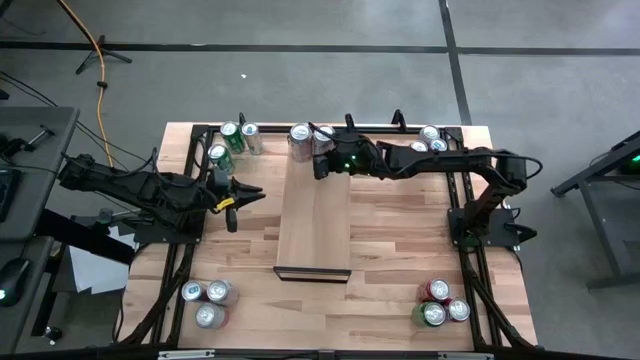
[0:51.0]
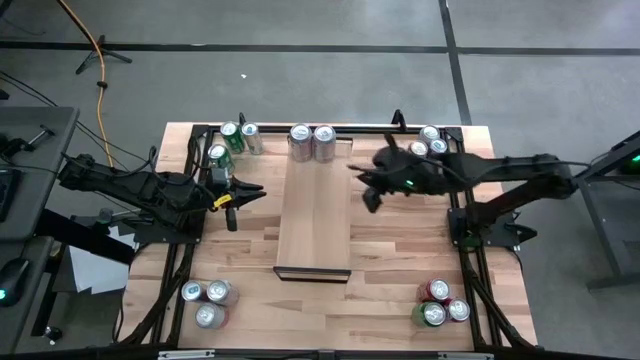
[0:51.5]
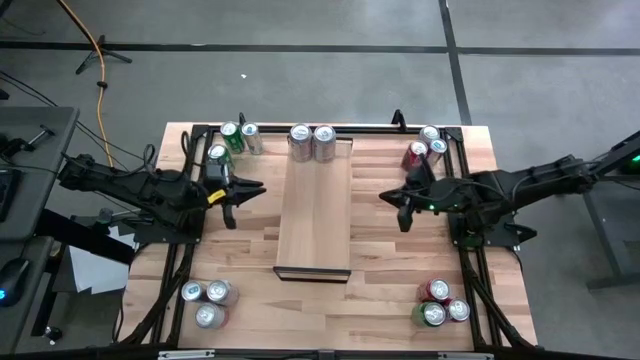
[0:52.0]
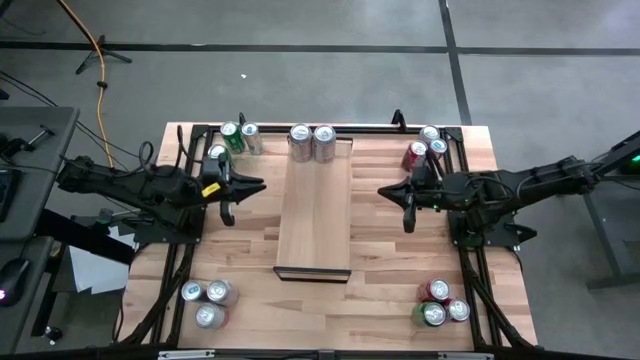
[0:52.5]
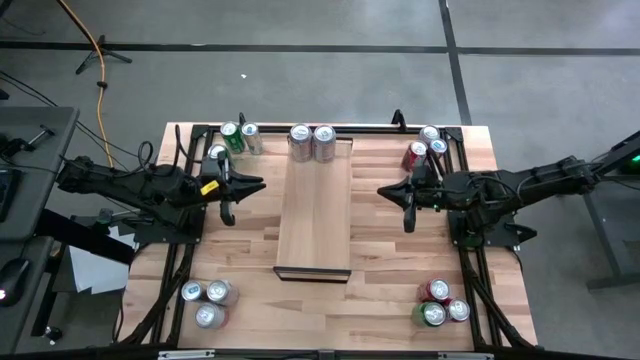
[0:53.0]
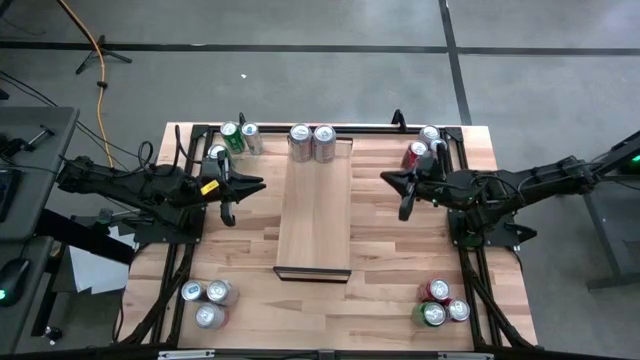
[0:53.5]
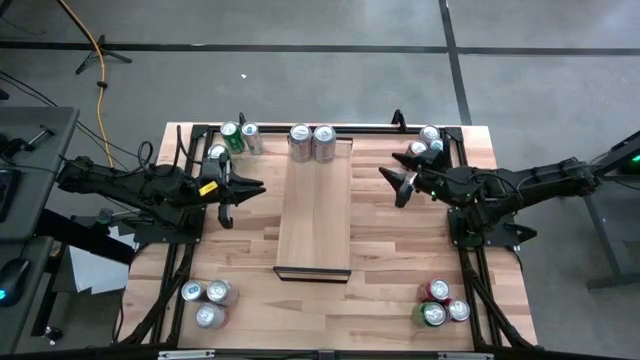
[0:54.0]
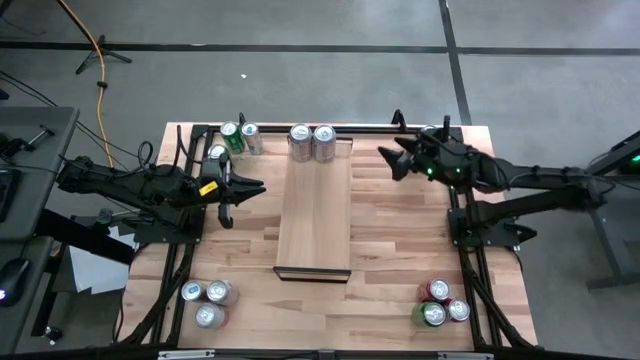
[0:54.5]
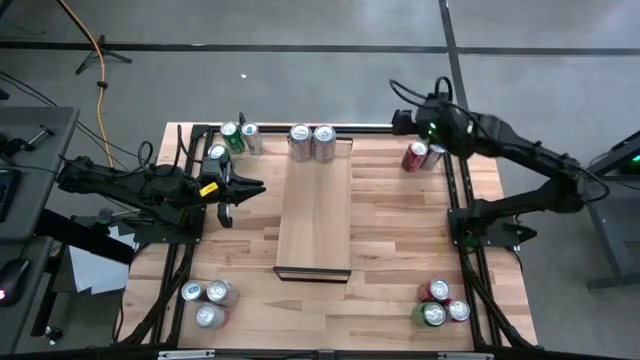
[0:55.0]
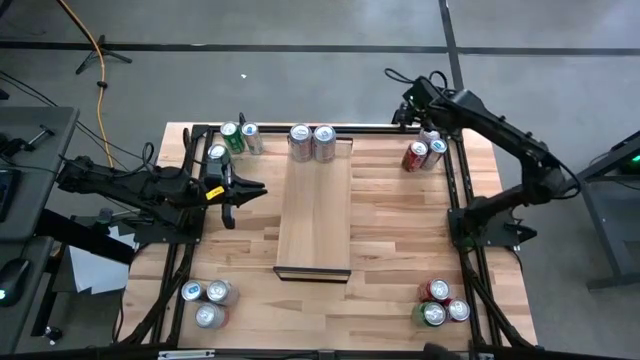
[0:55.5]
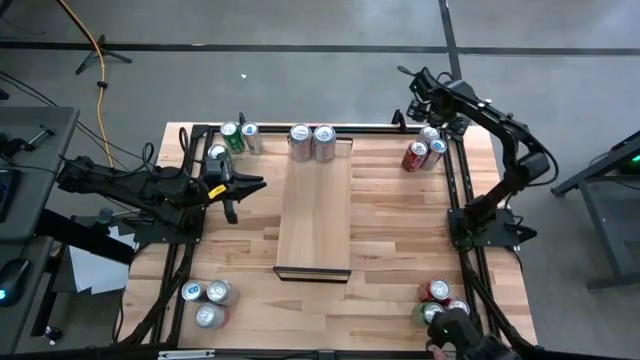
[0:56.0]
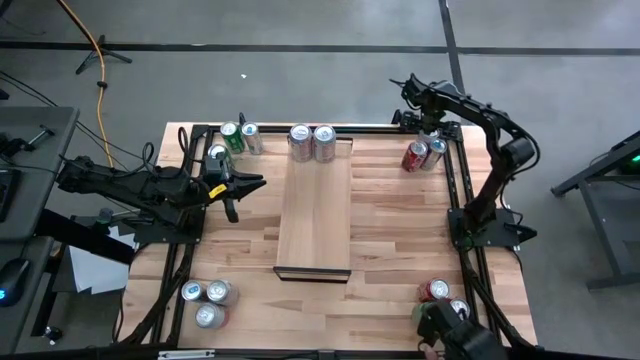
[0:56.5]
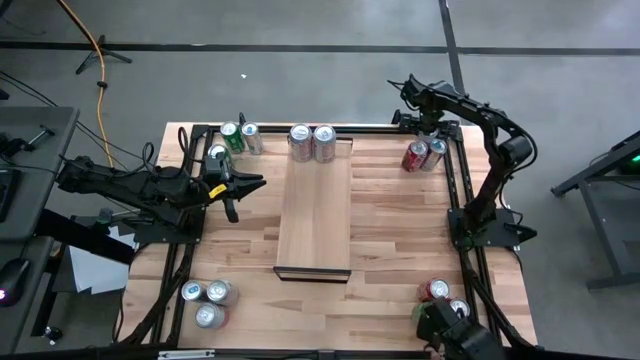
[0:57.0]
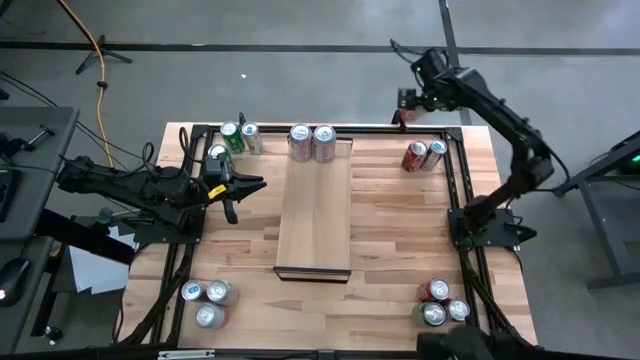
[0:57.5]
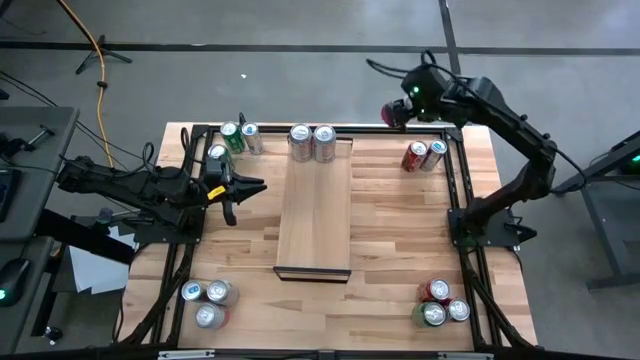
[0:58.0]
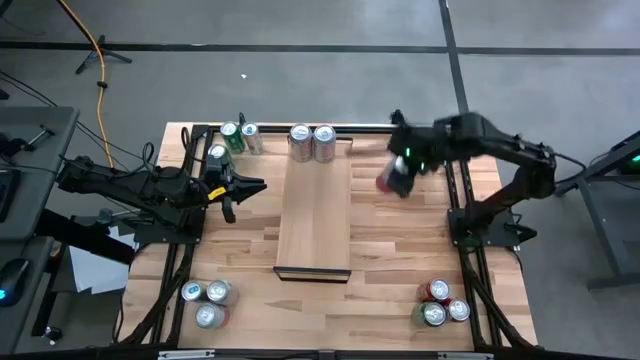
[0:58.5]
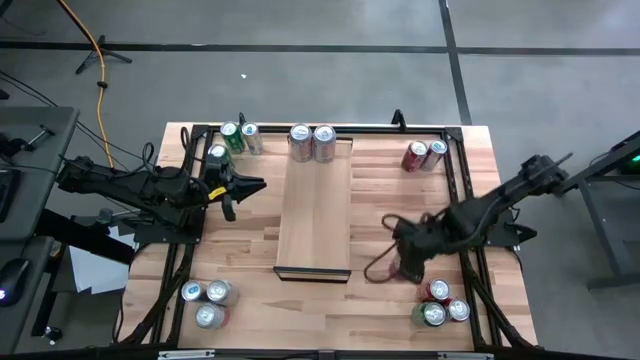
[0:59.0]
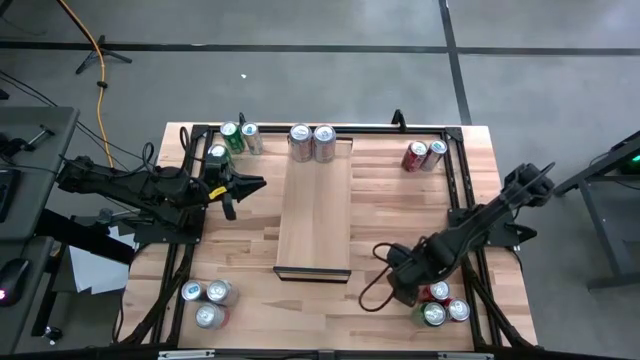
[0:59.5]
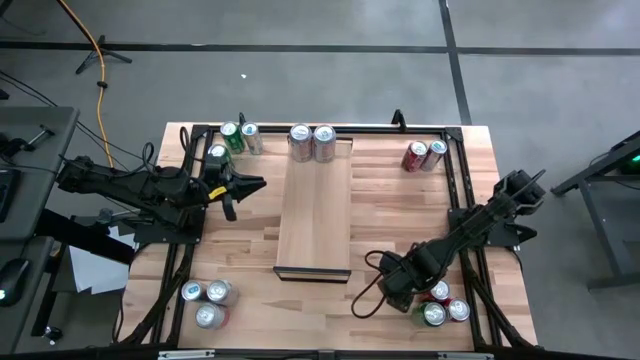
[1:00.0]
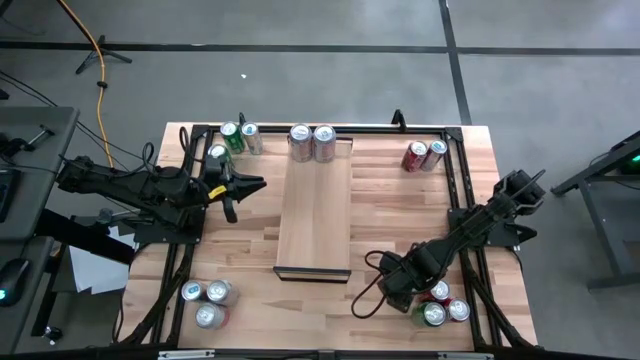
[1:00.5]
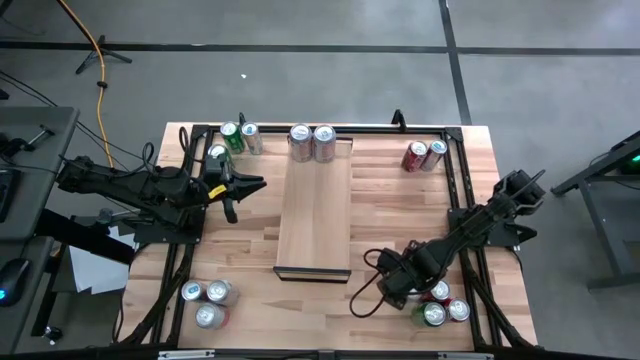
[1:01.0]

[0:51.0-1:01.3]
Task: Place canned beverage on shelf
Move the pink white soda can to the bottom right

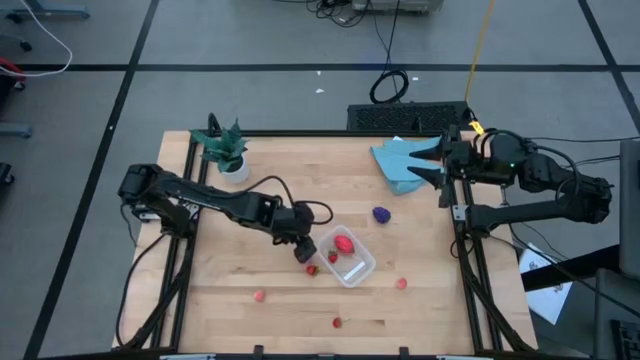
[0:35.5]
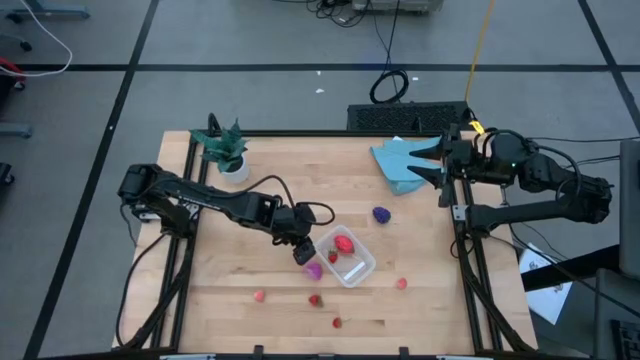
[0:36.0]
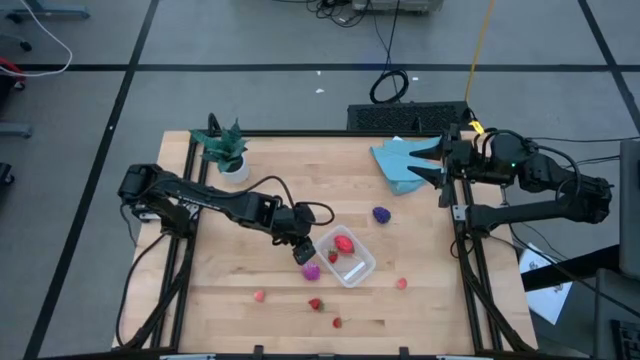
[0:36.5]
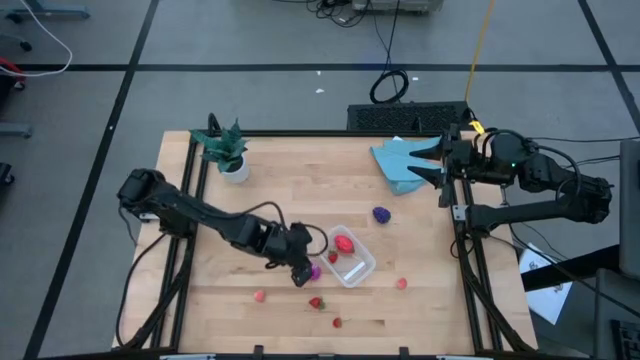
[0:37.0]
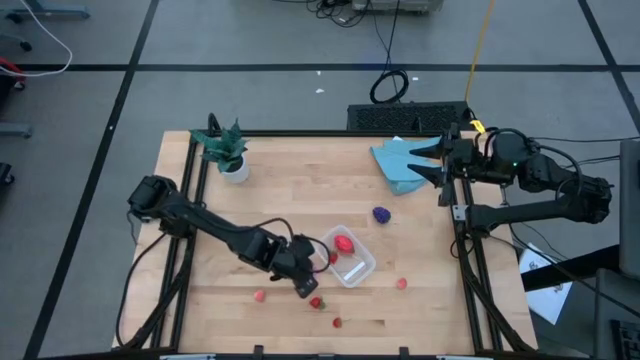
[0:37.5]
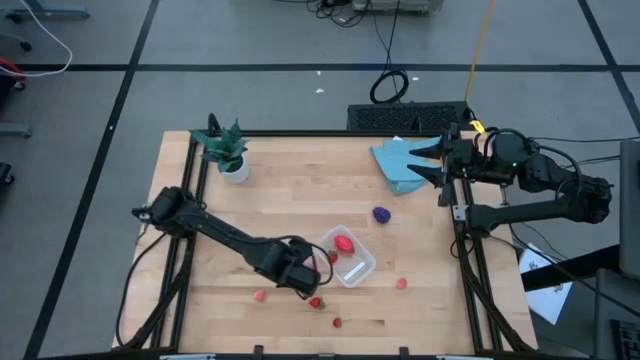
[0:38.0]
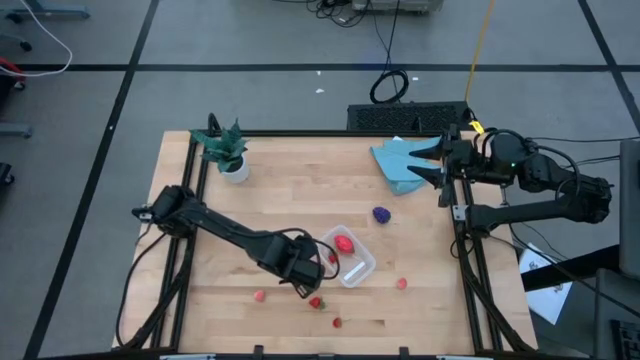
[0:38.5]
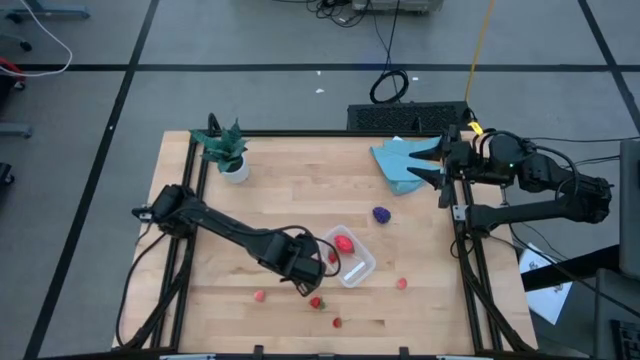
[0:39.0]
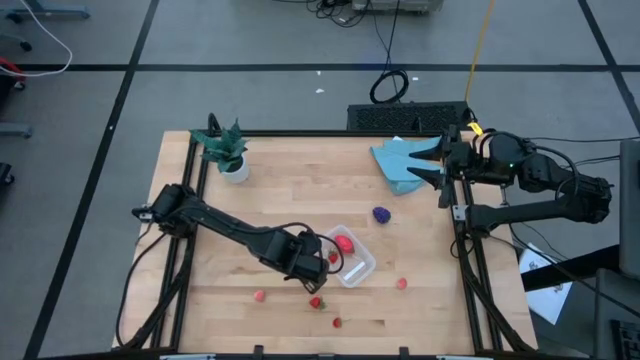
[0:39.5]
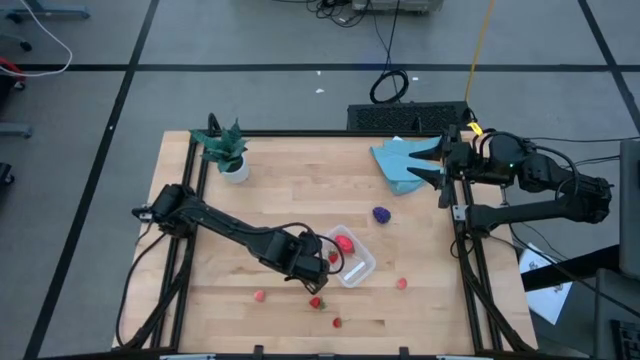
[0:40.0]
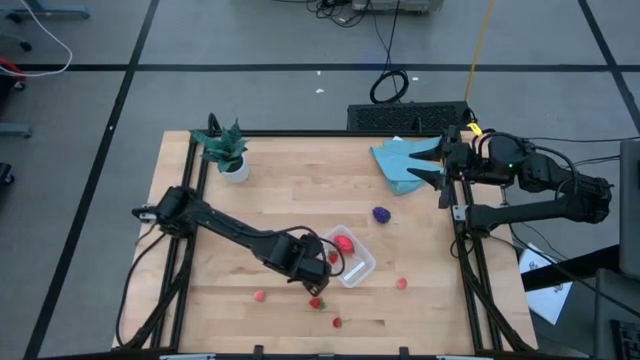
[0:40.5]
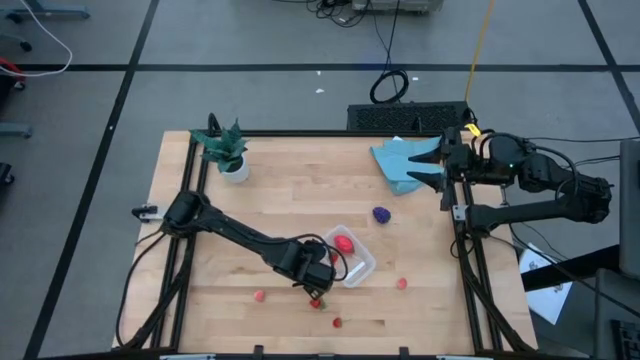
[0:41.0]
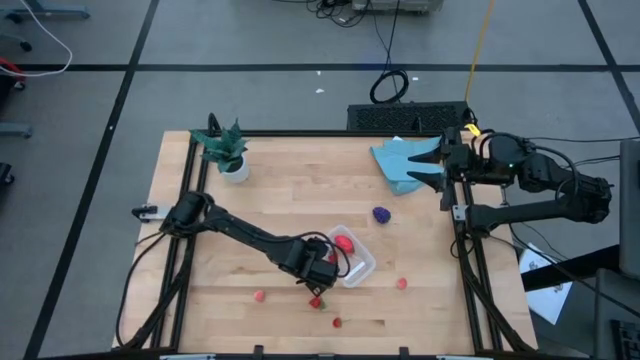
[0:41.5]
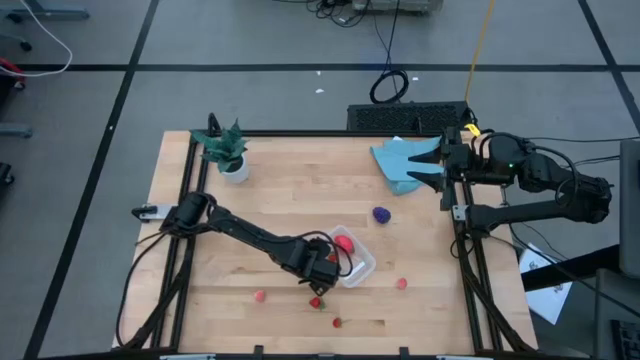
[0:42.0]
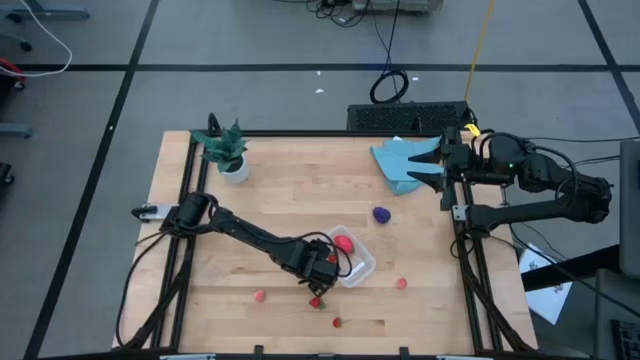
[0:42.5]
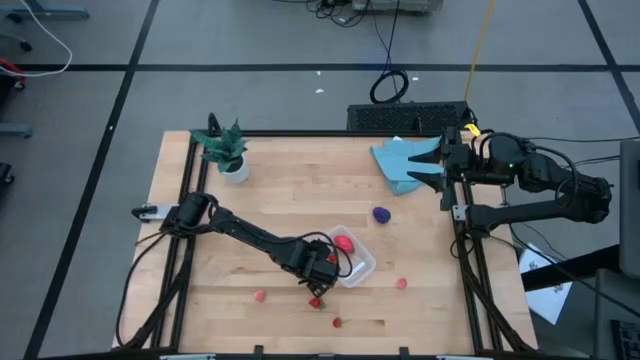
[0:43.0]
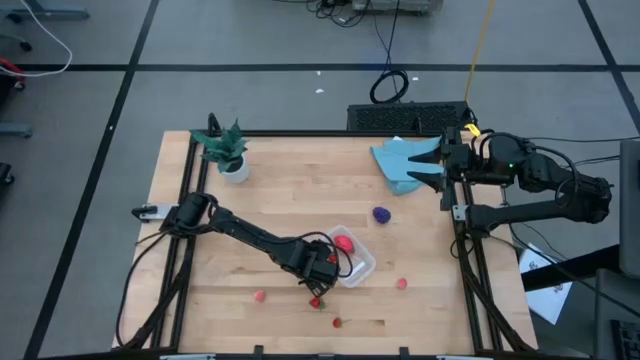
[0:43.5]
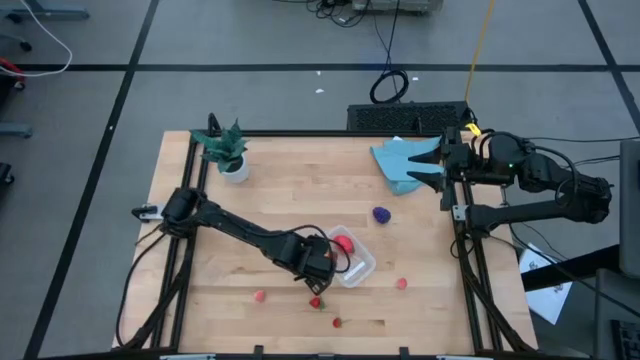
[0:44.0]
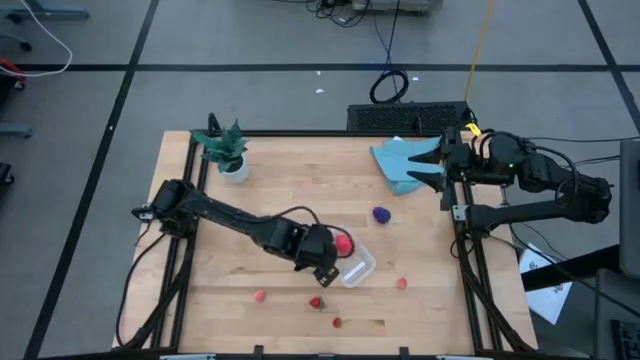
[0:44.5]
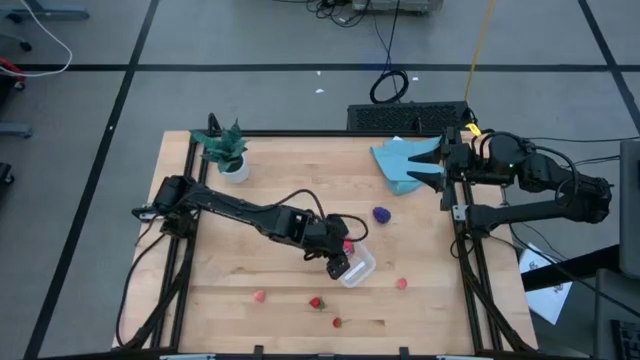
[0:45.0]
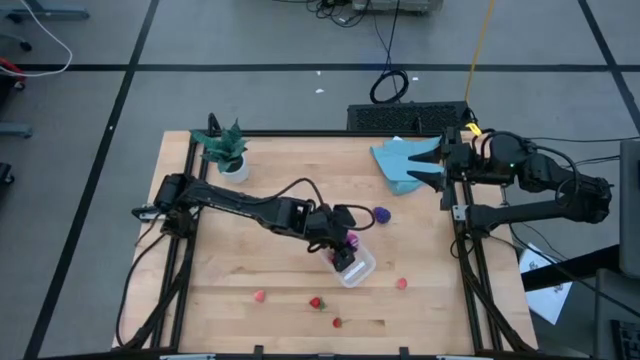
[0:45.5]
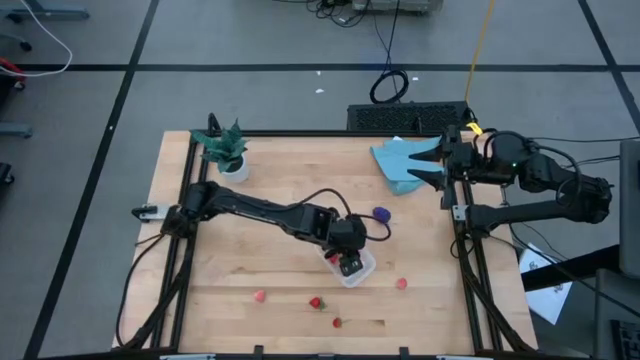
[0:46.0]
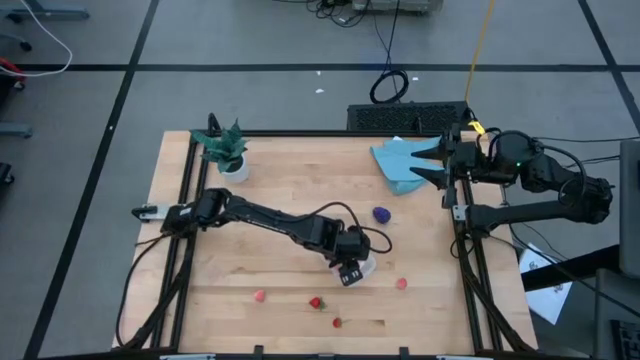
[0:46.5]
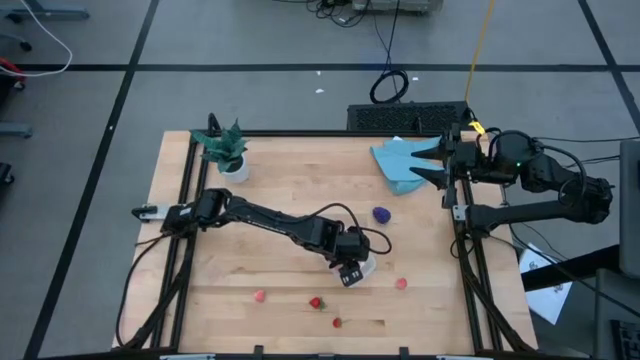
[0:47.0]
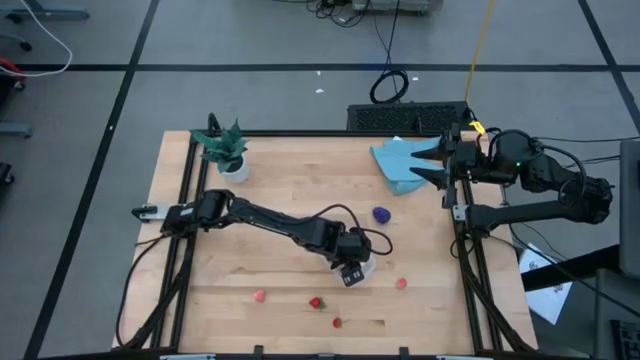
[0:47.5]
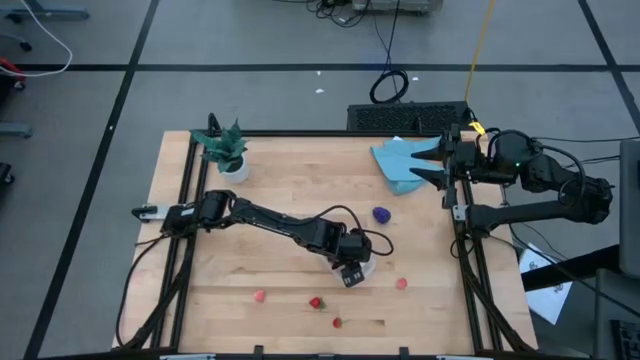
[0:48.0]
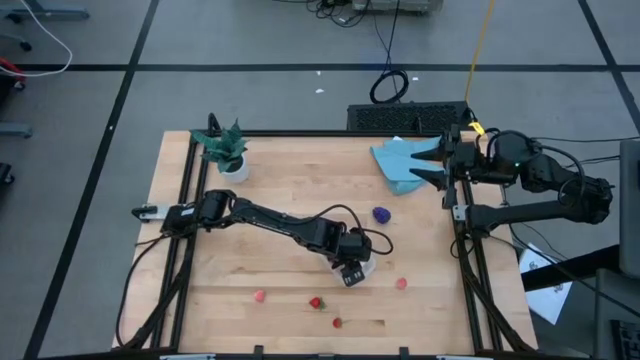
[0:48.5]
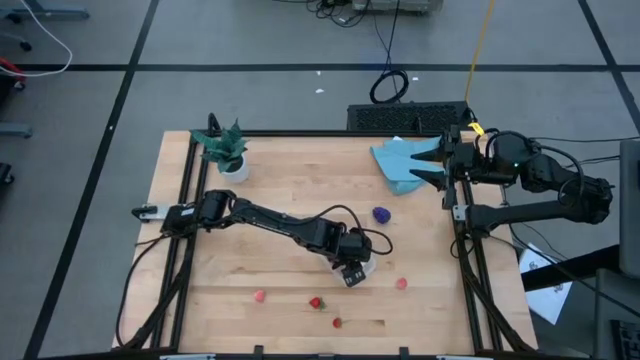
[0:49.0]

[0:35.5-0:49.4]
Task: Pick and placing Produce into tupperware
Put the onion into the transparent container
